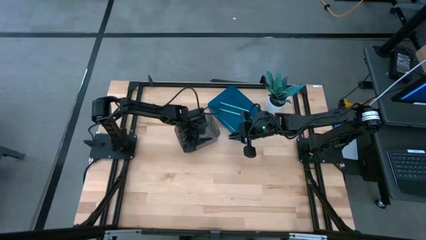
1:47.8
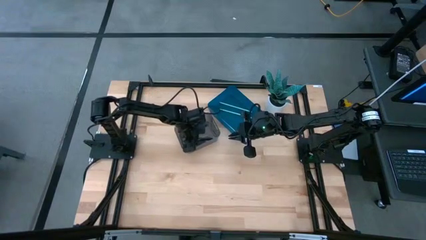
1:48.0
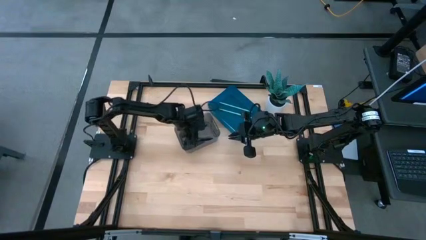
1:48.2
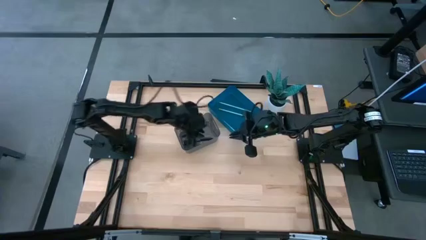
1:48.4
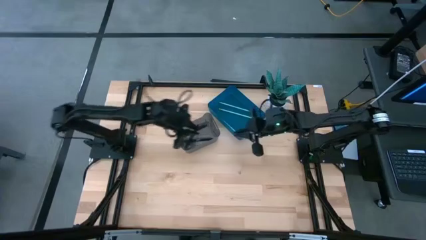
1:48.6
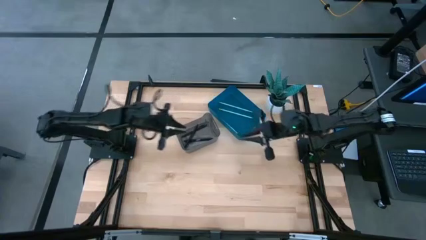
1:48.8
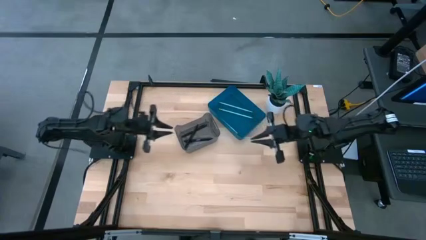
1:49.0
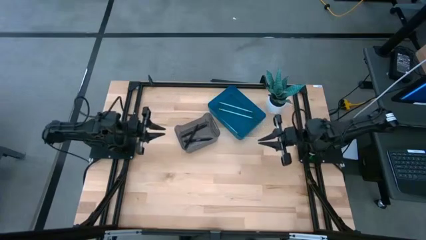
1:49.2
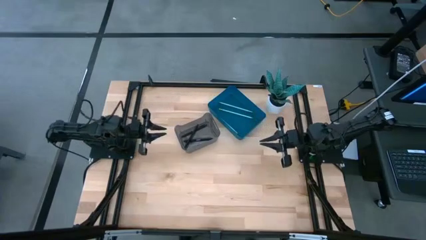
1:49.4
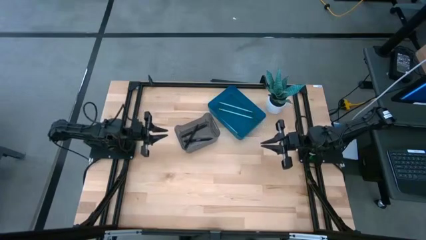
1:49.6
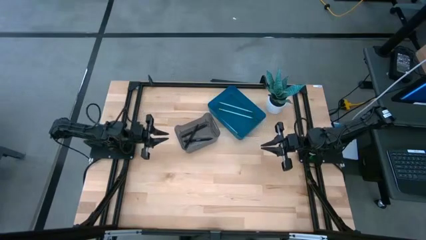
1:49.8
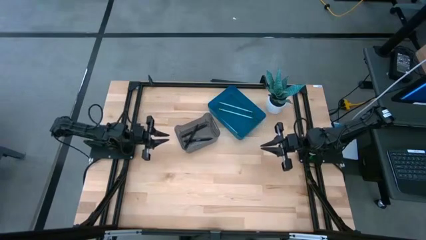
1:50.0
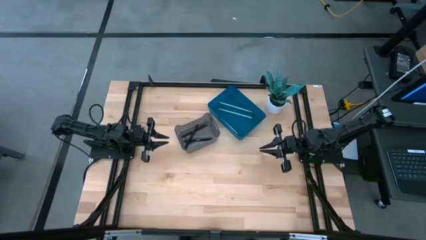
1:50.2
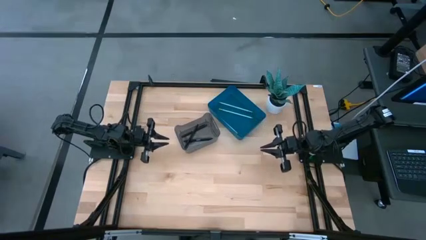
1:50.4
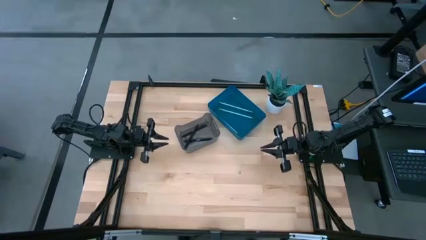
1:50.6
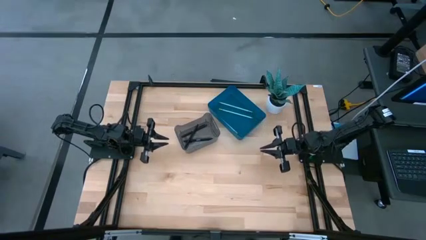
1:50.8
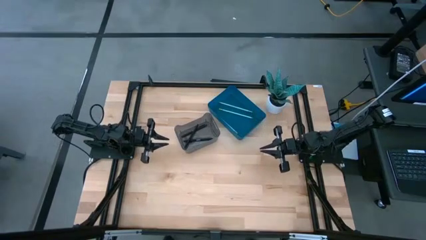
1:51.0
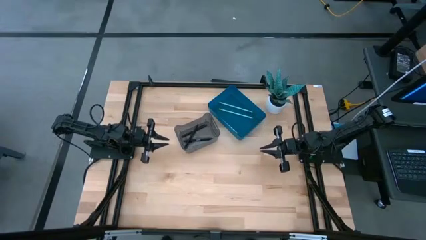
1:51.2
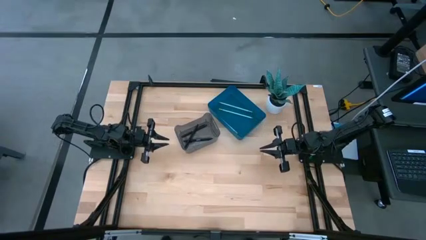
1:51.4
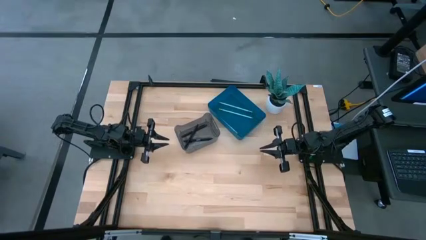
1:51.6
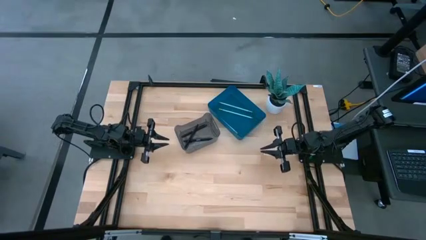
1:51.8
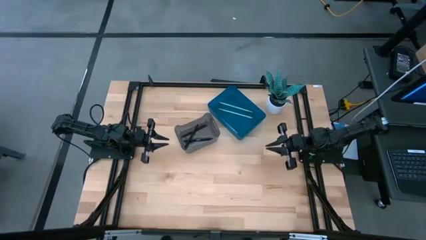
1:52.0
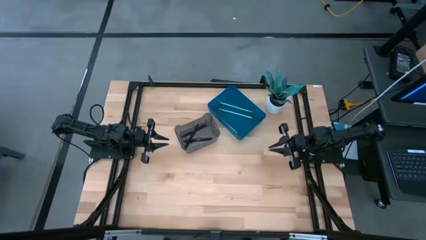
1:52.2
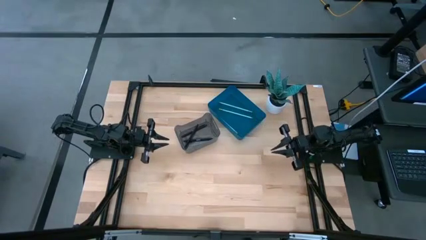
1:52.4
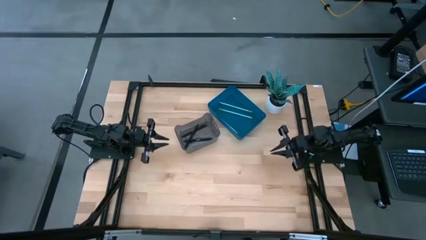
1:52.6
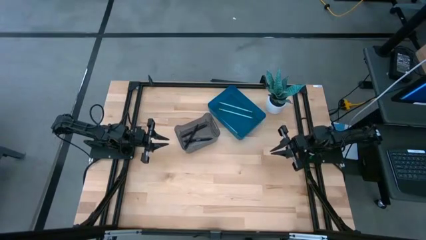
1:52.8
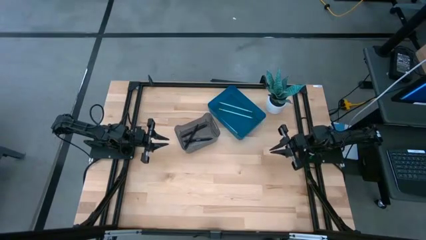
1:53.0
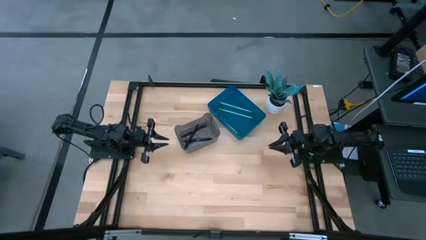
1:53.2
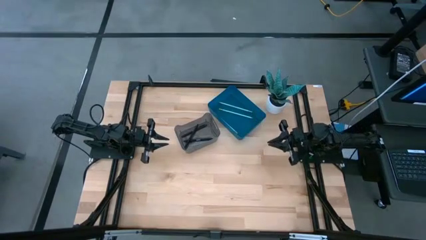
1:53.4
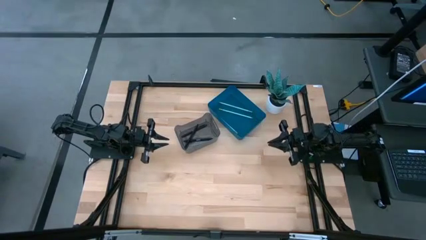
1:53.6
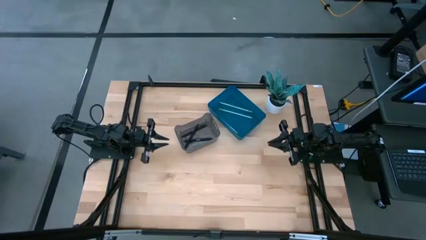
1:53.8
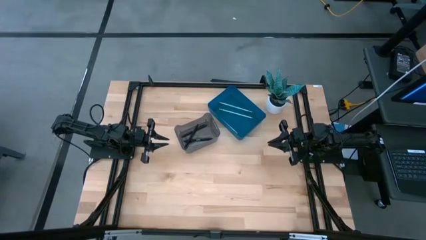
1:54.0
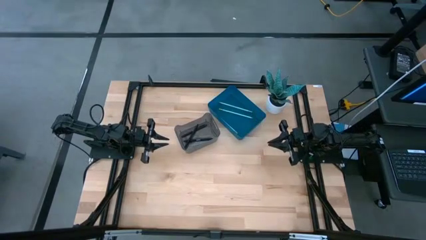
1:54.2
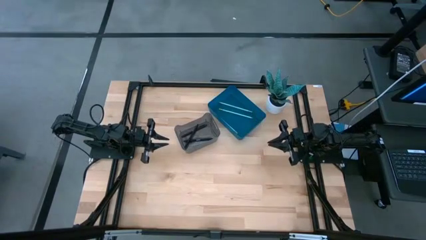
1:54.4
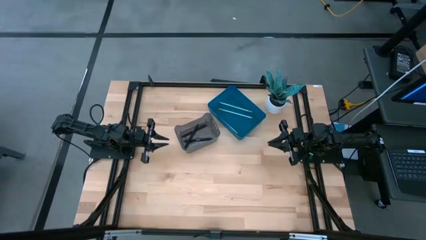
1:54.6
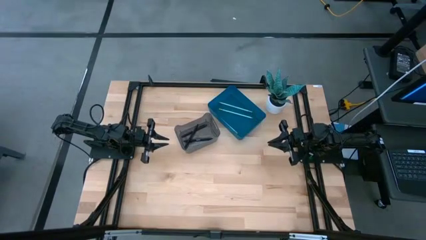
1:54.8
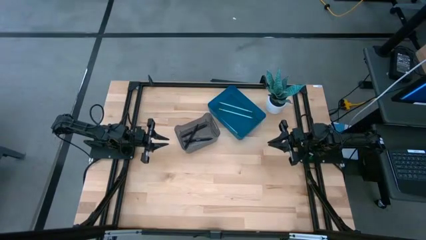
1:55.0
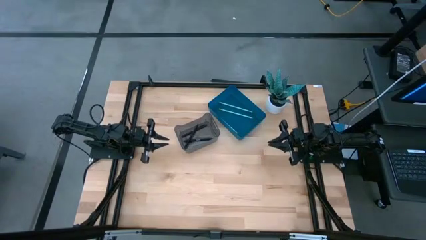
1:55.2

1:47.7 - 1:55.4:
Task: Sort pens & pencils
Return to Home Position

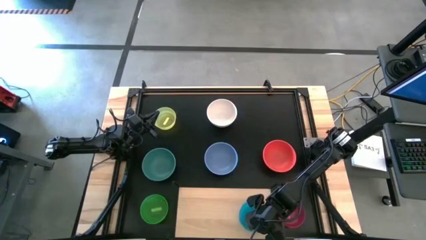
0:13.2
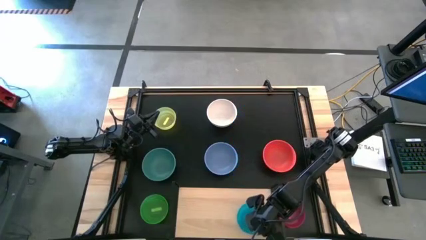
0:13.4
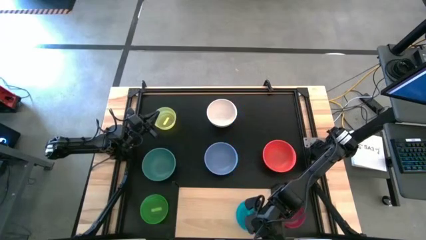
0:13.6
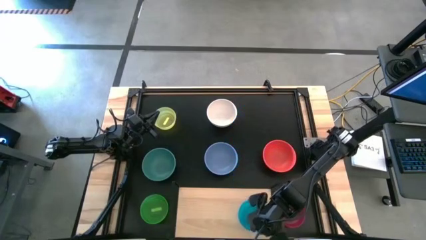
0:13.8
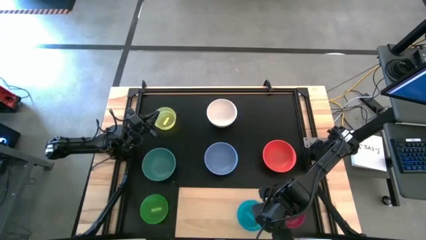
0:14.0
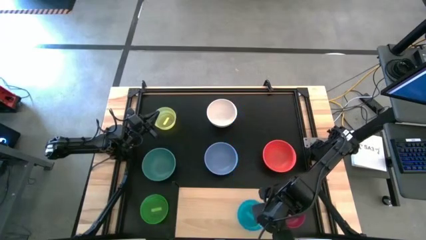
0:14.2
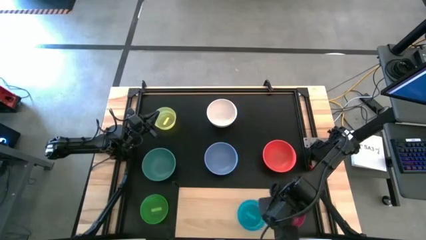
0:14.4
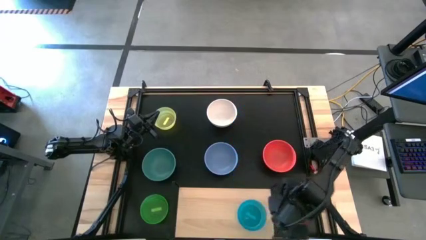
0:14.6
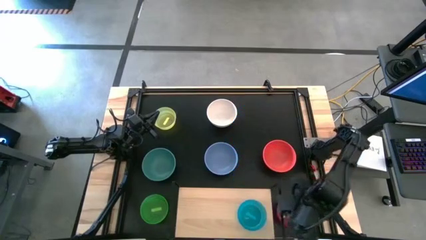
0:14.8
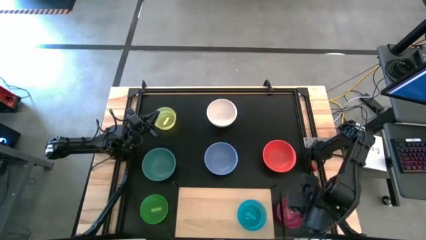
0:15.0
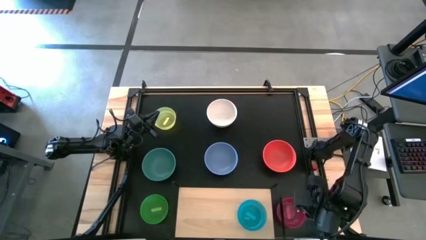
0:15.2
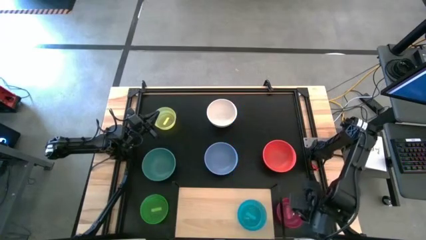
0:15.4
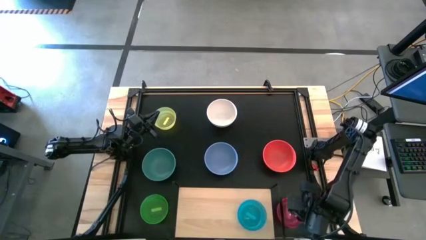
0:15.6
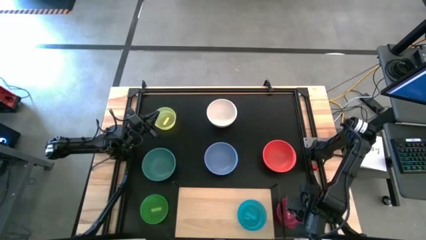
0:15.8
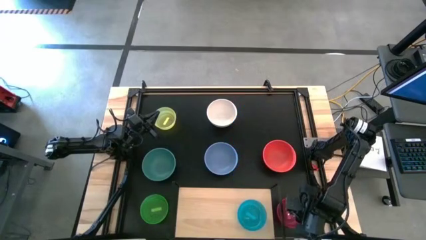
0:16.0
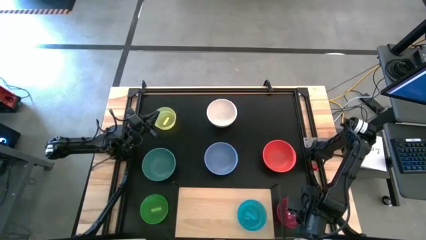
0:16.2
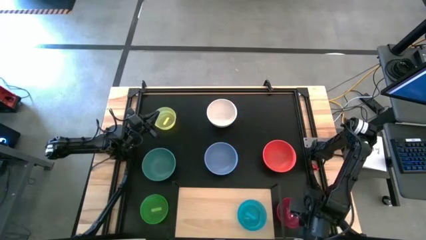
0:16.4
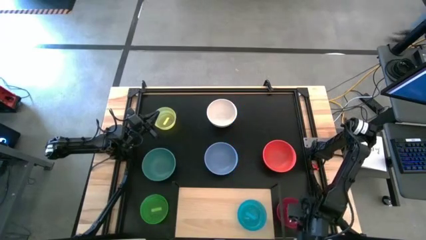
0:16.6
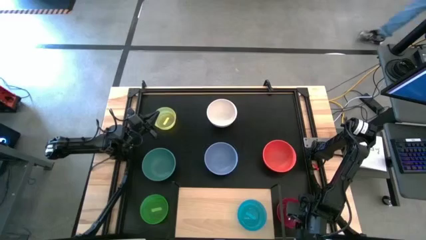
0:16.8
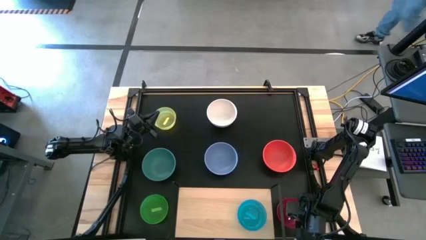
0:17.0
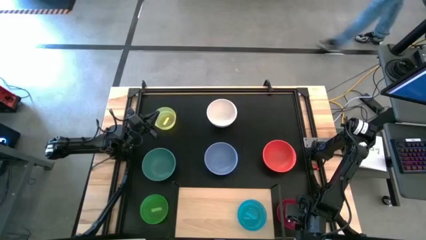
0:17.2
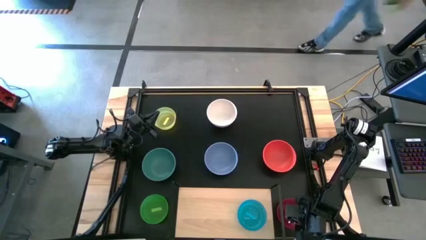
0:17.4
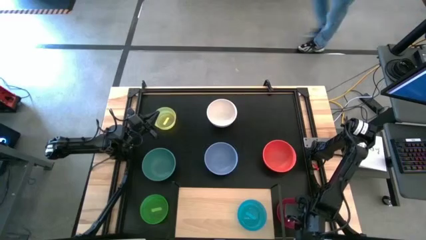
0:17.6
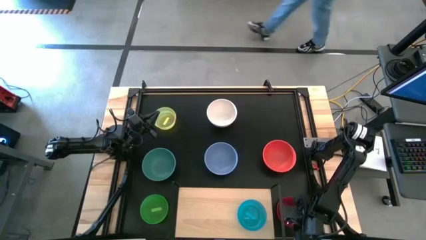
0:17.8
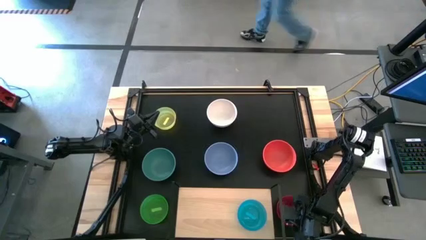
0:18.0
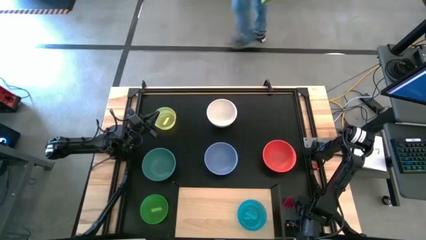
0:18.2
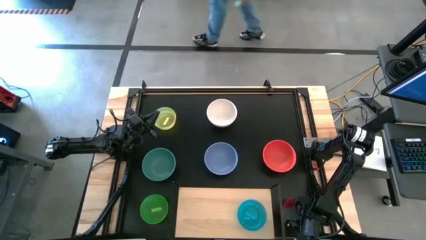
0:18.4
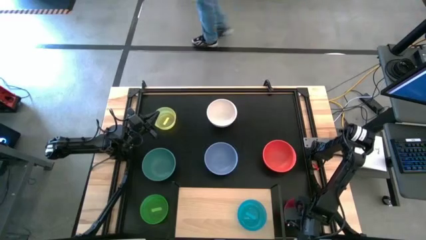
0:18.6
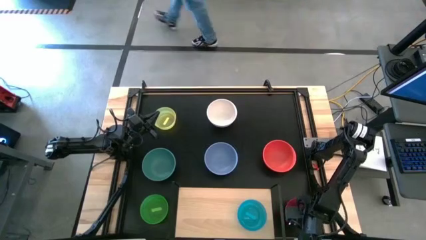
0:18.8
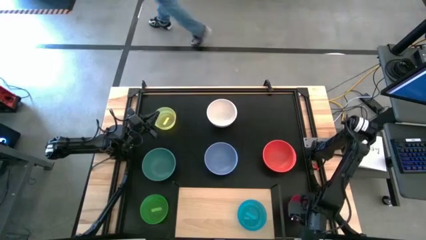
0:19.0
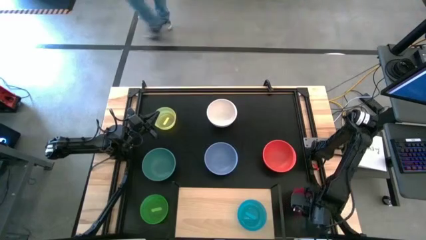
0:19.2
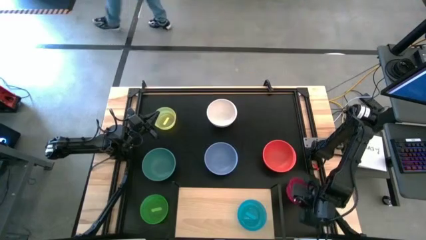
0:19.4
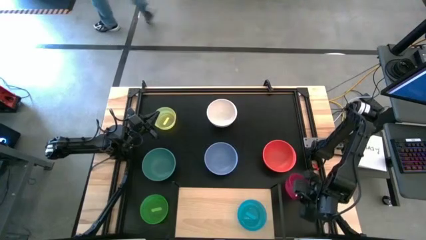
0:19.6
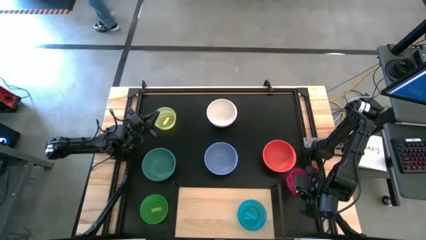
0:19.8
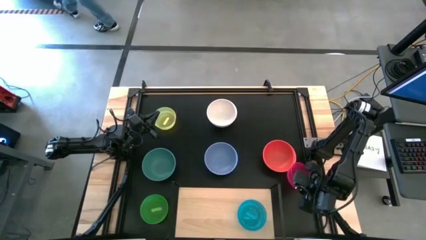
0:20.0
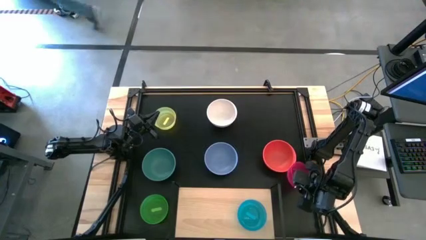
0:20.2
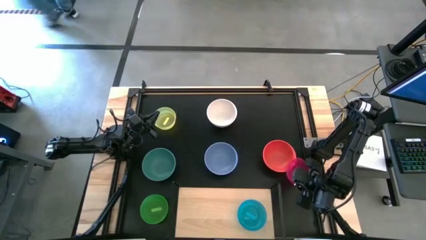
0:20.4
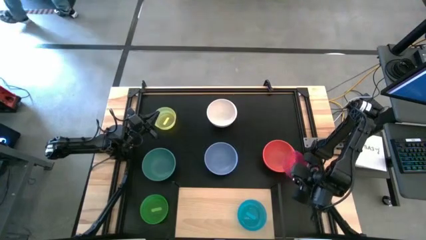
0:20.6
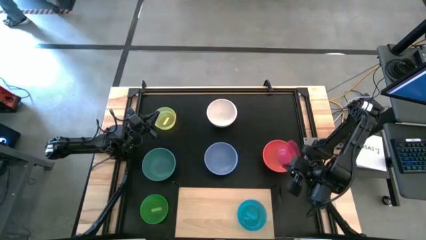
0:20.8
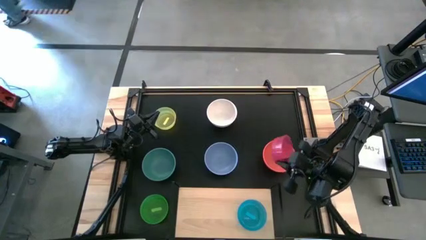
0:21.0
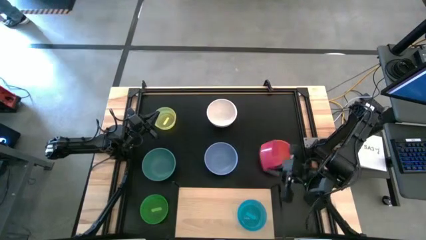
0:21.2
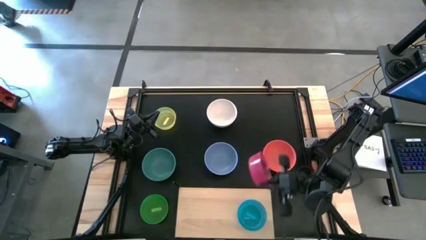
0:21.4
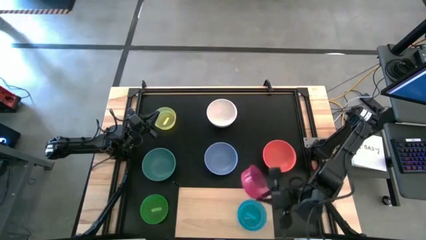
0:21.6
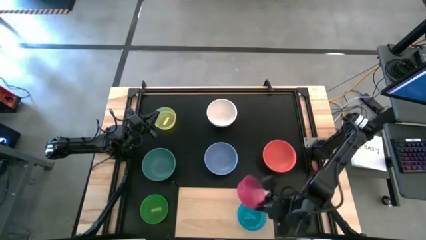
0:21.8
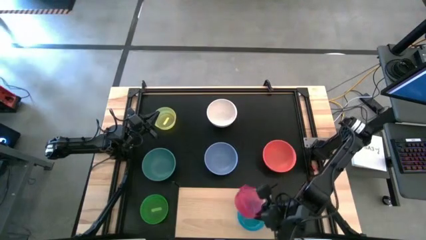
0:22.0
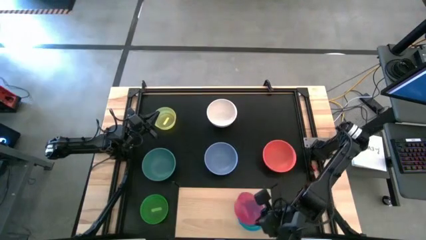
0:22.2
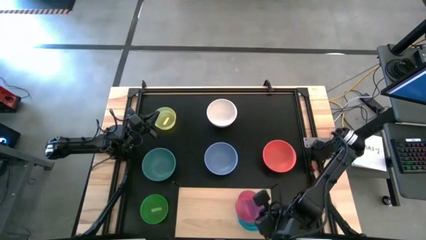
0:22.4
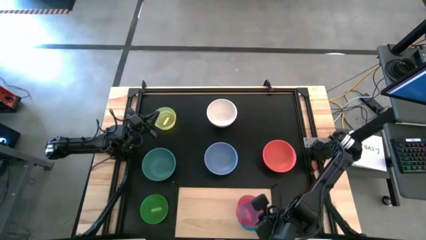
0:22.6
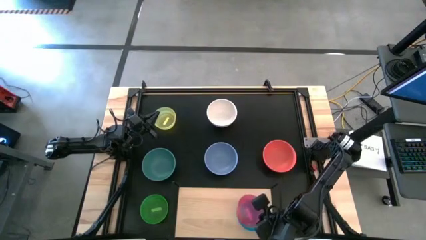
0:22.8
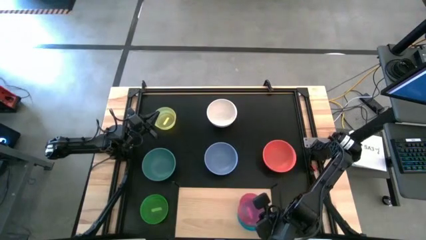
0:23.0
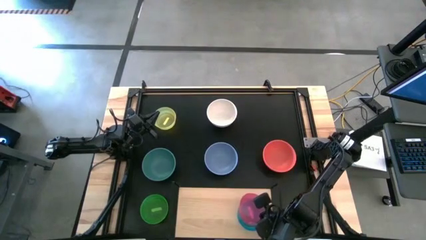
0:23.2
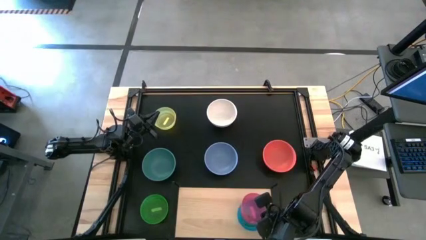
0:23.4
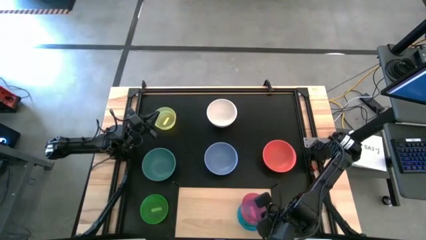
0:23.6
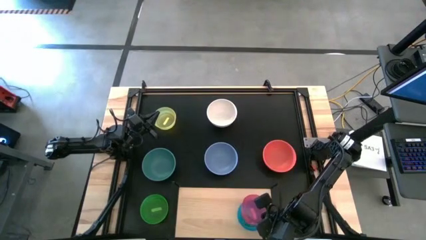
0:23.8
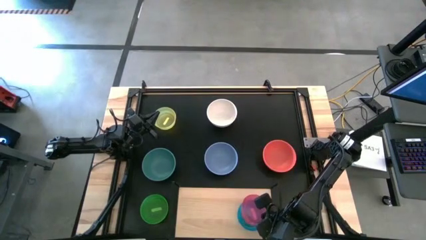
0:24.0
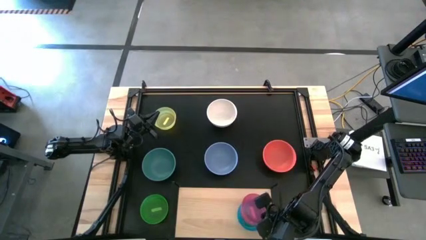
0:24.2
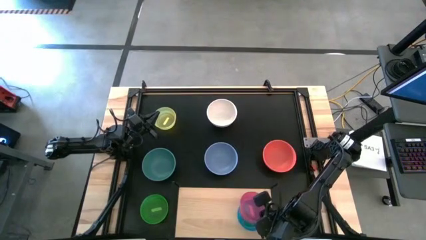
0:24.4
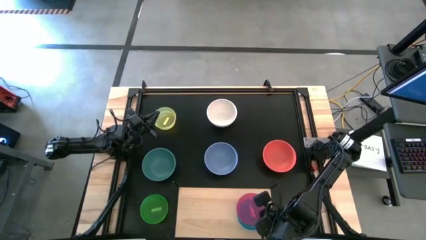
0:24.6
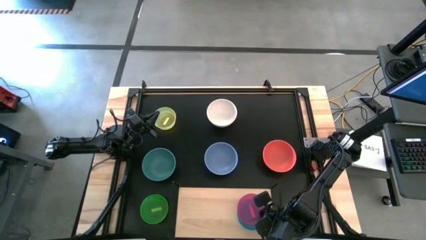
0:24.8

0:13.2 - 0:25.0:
Task: Place and stack bowls onto a shelf
Stack the small pink bowl on top of the small blue bowl on the shelf
